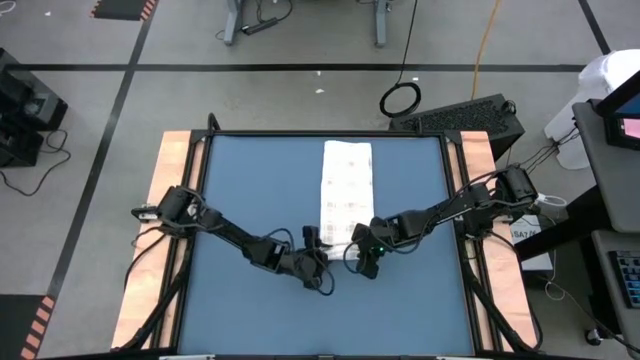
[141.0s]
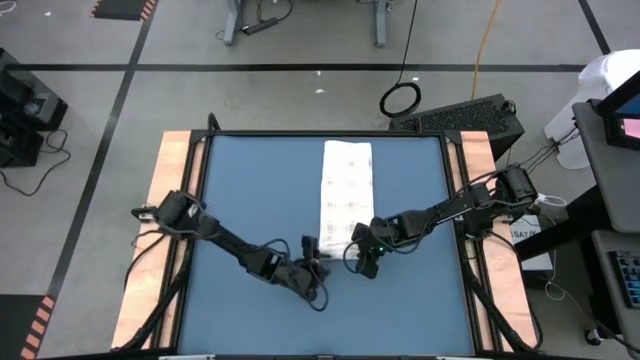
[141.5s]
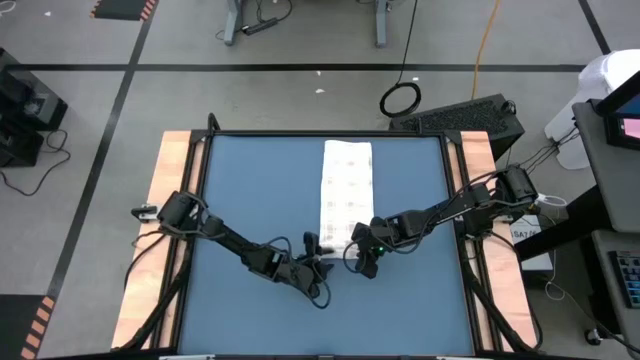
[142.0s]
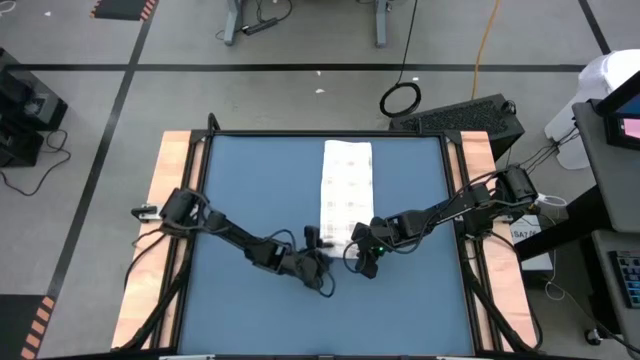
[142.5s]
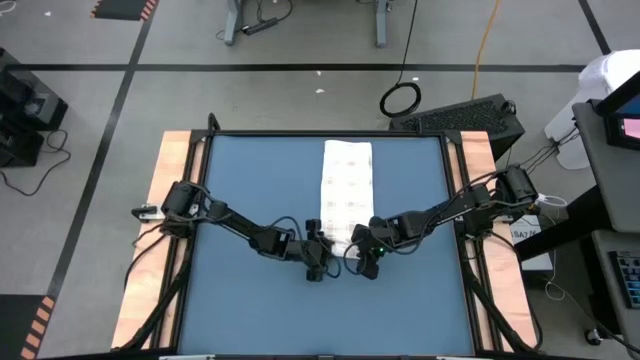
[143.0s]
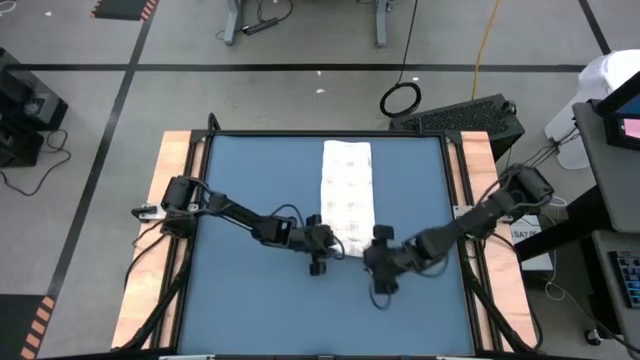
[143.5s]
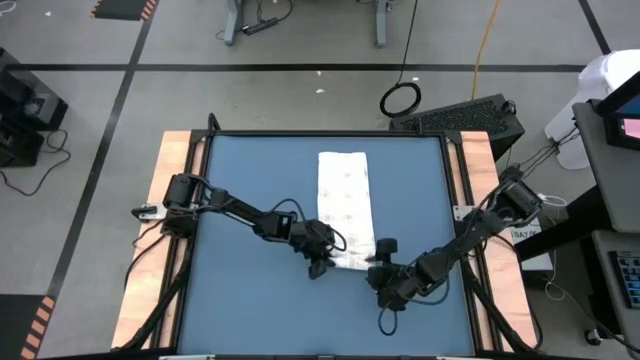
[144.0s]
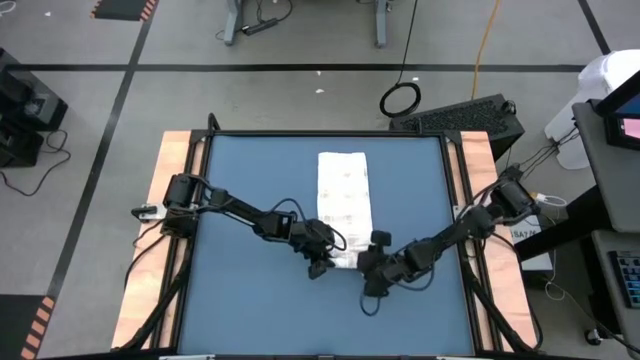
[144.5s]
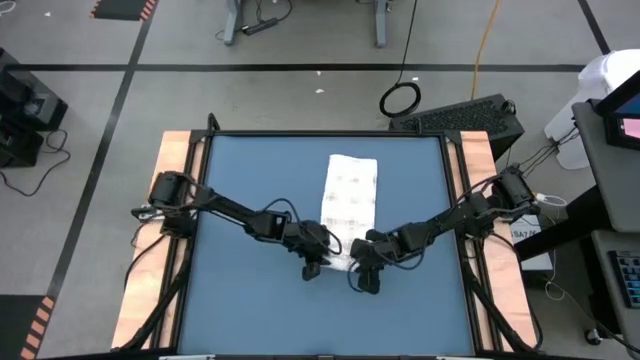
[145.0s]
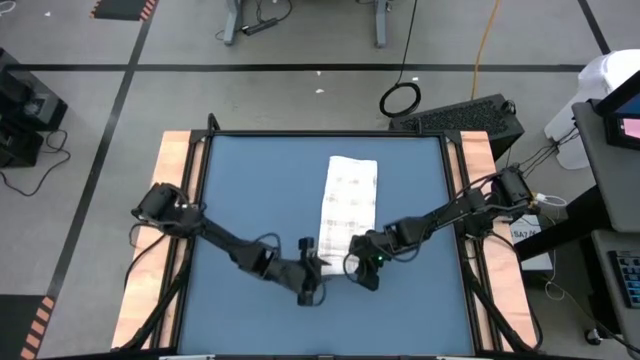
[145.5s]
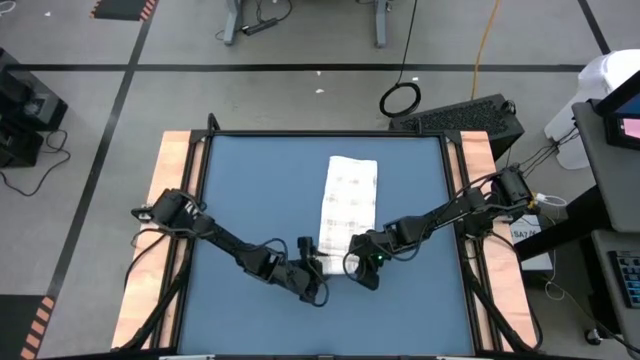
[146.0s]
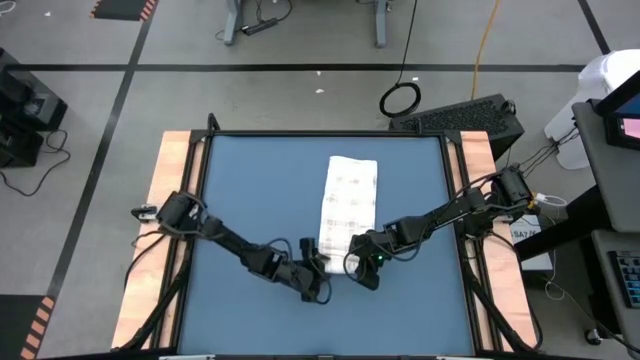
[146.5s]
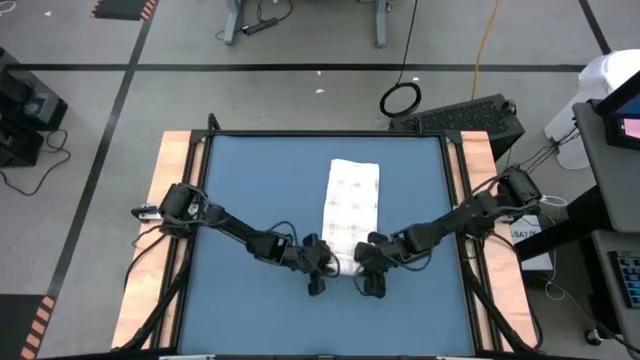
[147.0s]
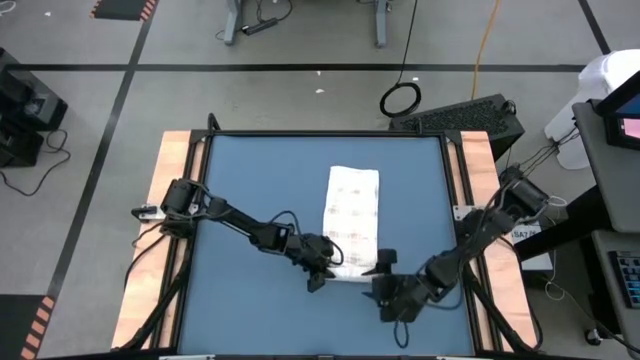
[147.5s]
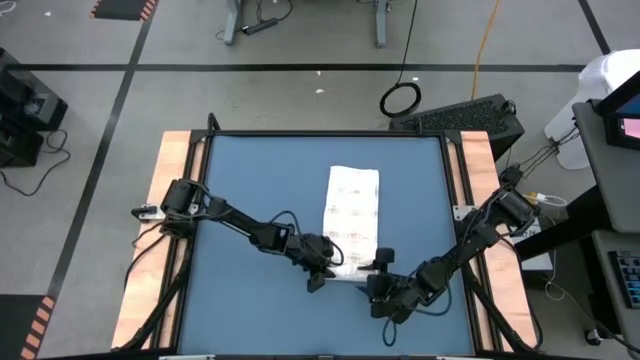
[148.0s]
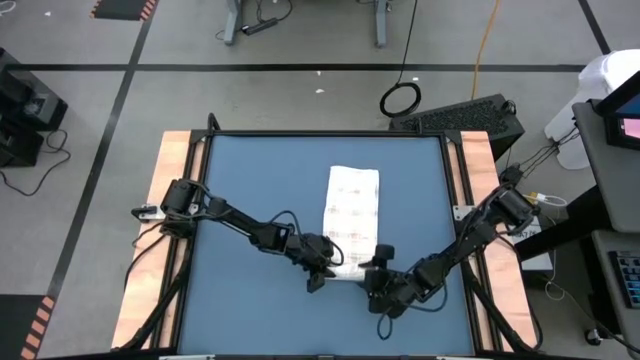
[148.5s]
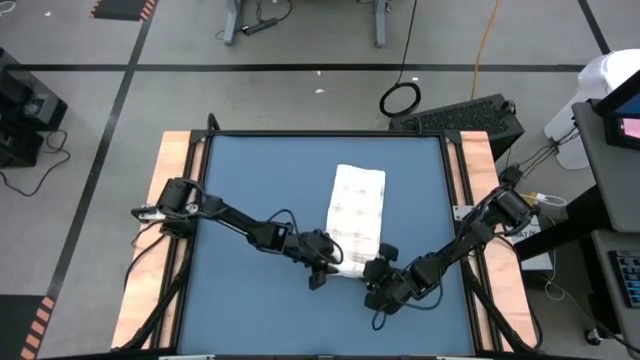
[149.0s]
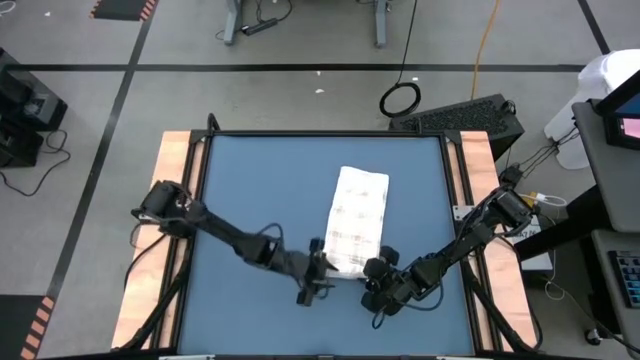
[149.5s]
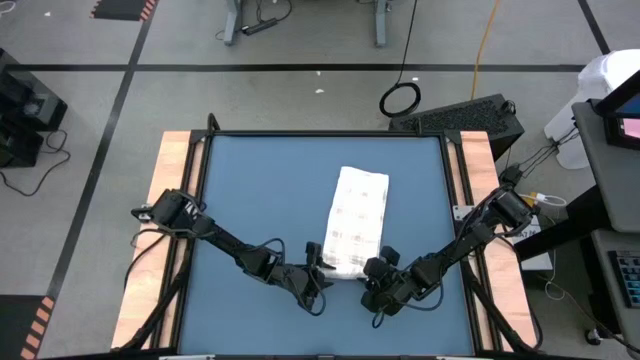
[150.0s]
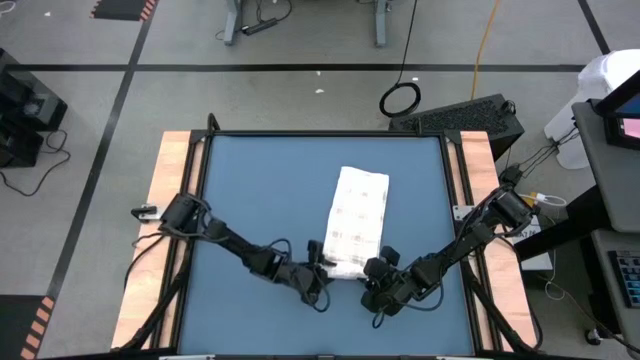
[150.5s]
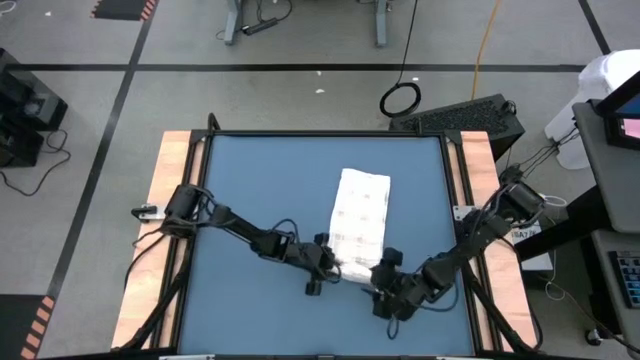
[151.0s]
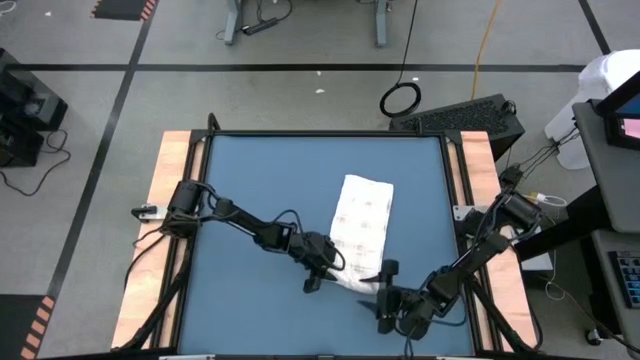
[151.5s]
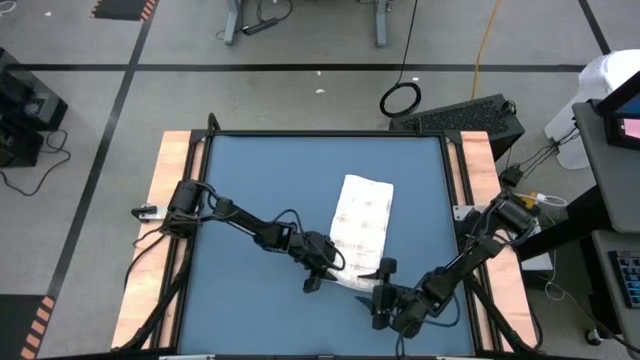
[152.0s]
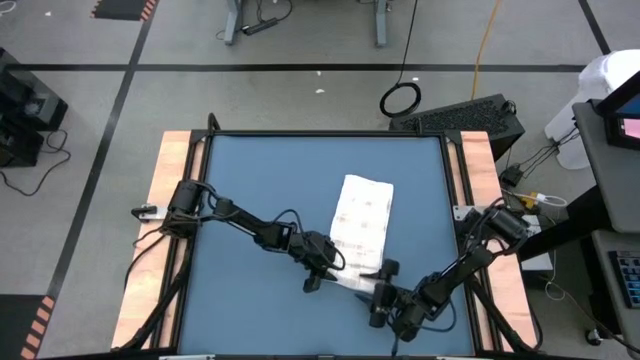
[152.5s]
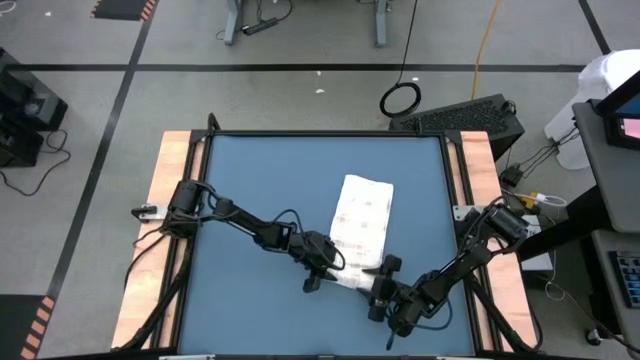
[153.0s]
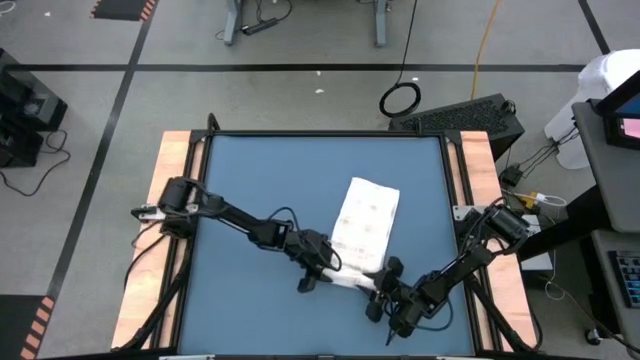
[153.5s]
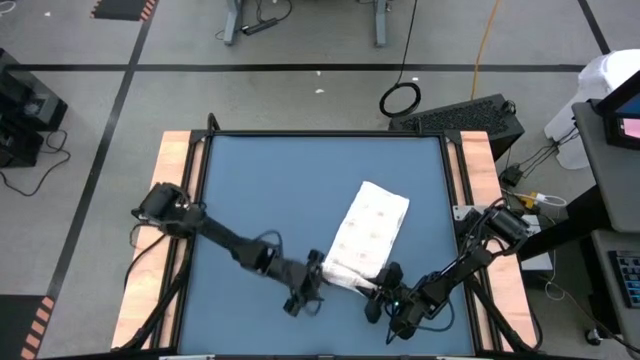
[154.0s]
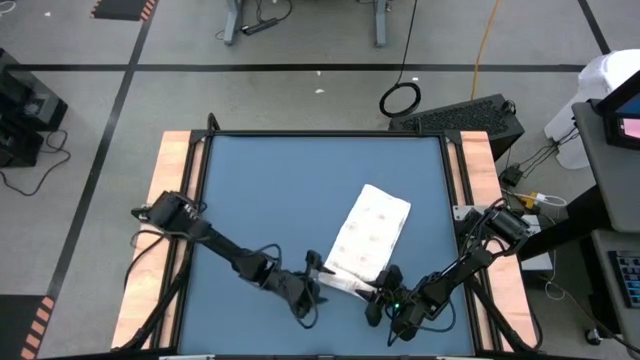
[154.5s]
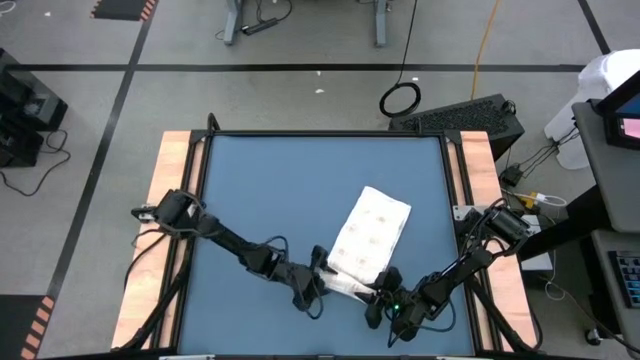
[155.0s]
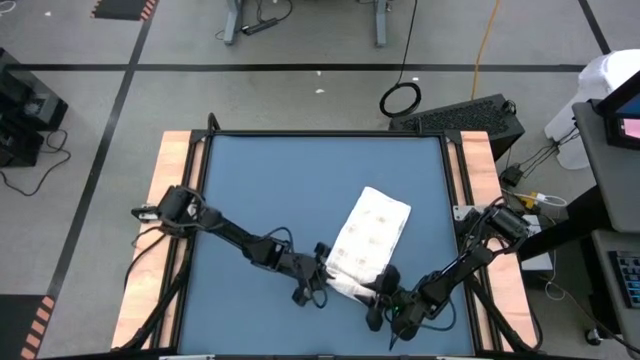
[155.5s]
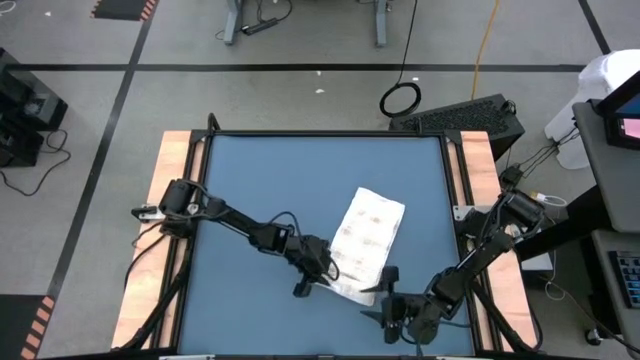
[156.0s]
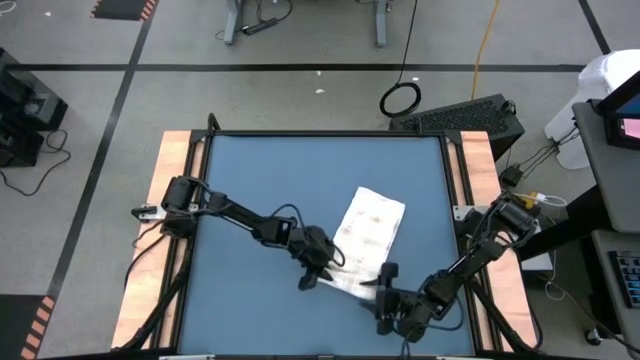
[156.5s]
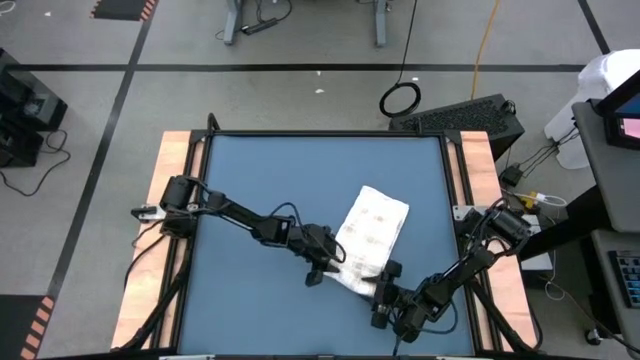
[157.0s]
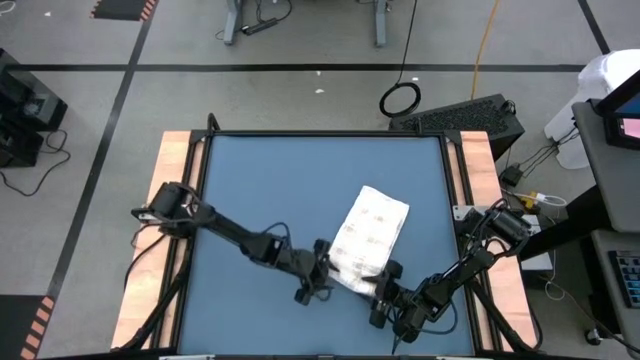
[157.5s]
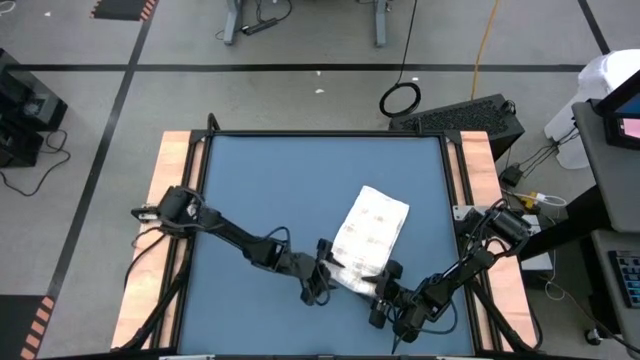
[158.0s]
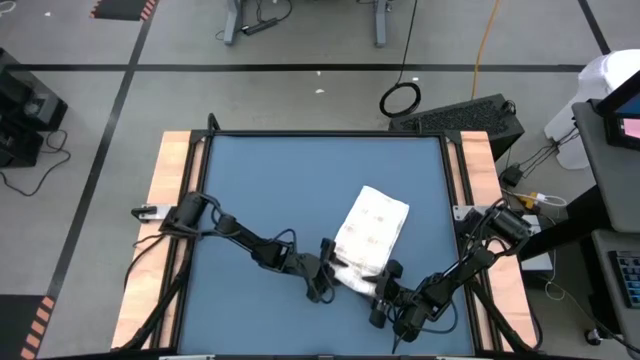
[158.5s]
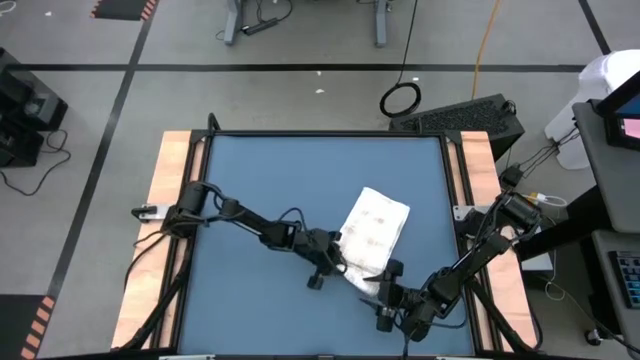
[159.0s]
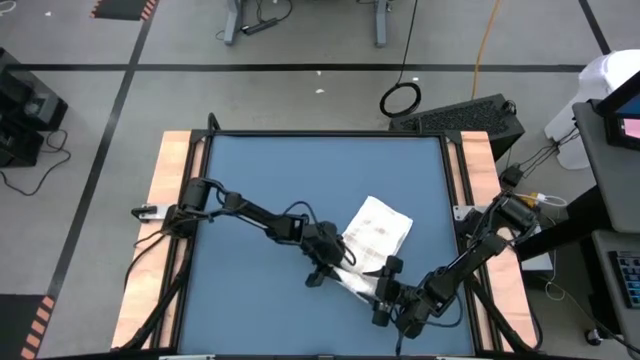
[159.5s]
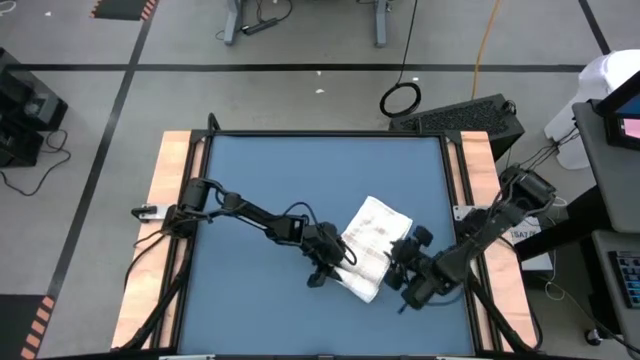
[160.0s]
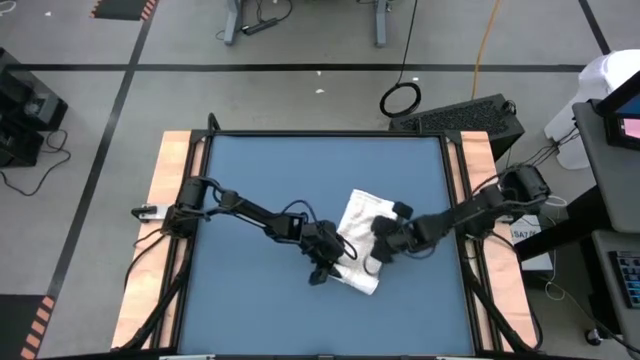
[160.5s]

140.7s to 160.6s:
Task: Roll towel
Roll the white towel

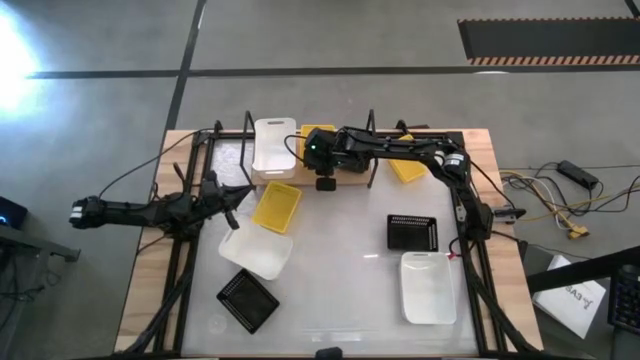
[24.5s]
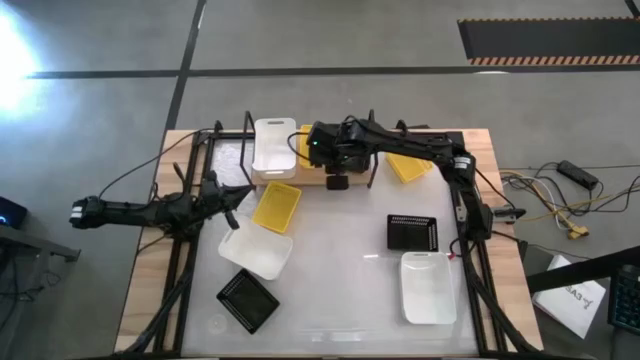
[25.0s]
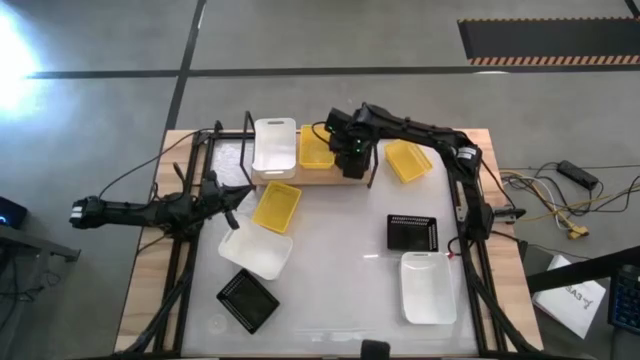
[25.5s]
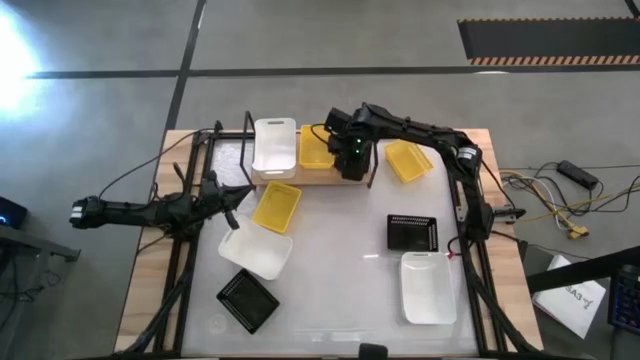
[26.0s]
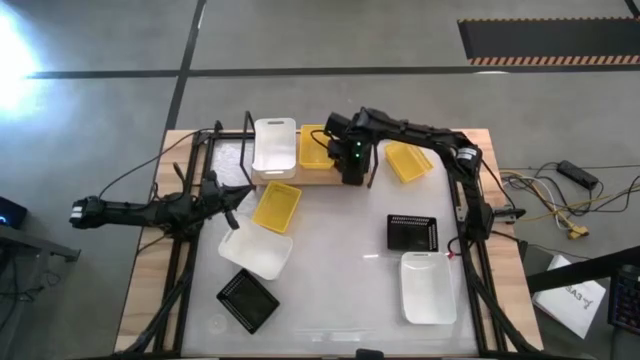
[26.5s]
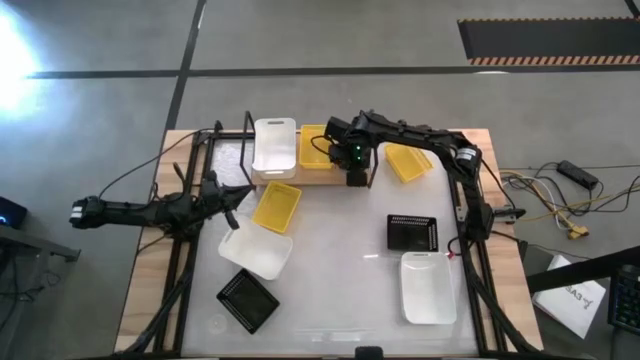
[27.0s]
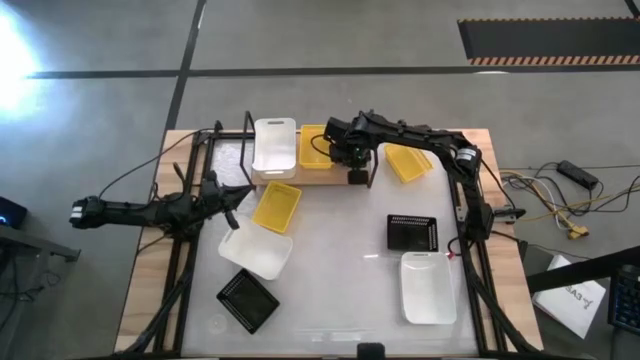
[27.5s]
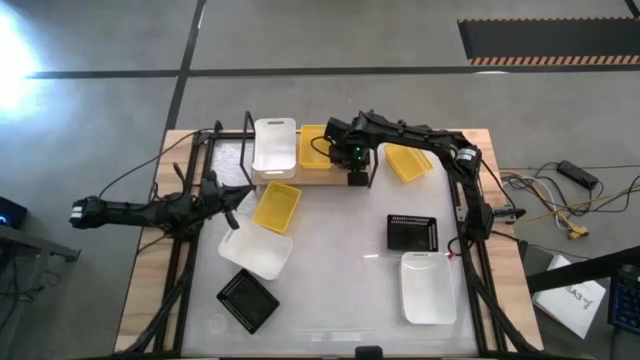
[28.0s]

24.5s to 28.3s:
Task: Stack baskets on shelf by color
Adjust the black bin on the shelf
